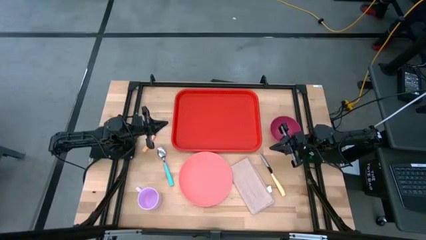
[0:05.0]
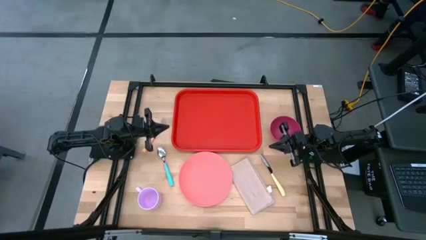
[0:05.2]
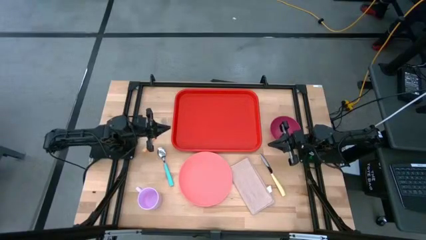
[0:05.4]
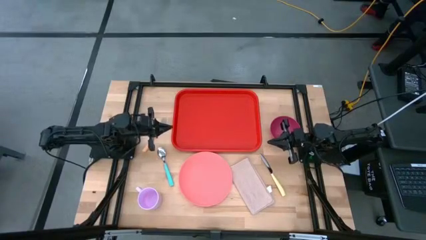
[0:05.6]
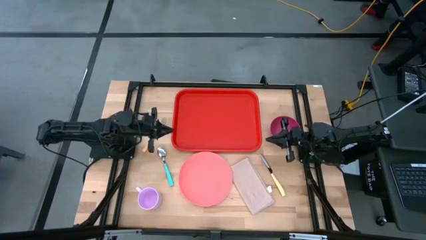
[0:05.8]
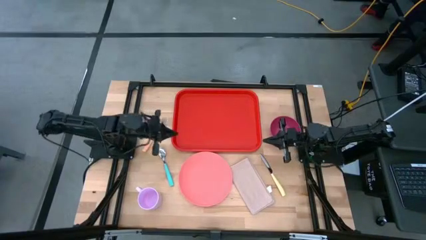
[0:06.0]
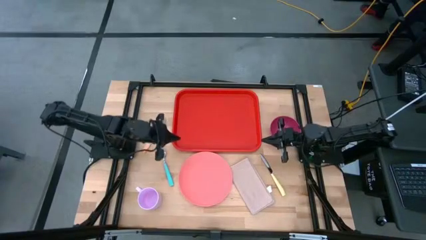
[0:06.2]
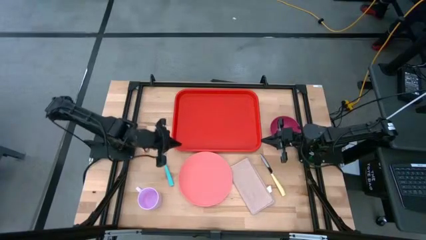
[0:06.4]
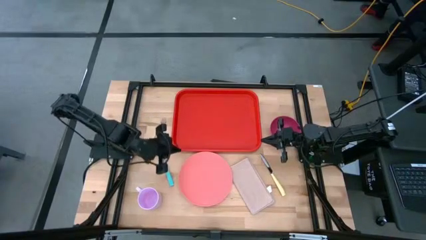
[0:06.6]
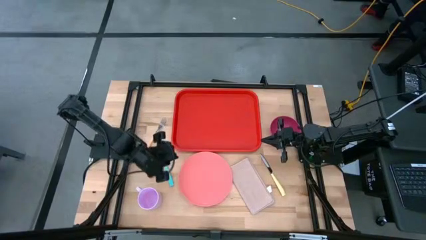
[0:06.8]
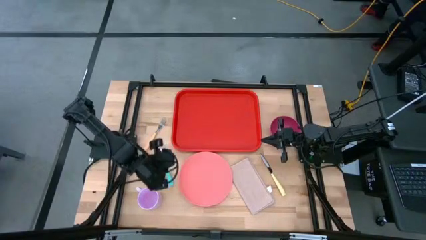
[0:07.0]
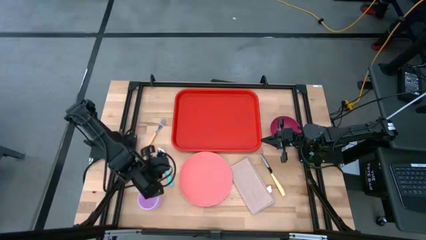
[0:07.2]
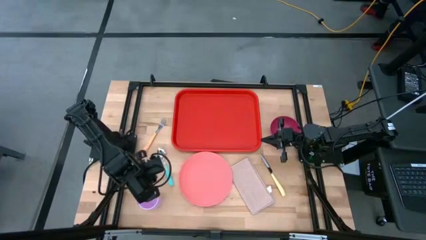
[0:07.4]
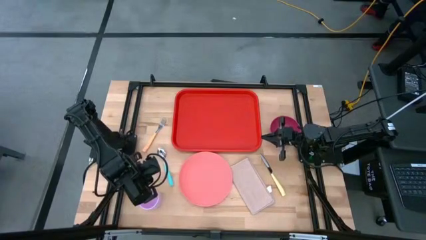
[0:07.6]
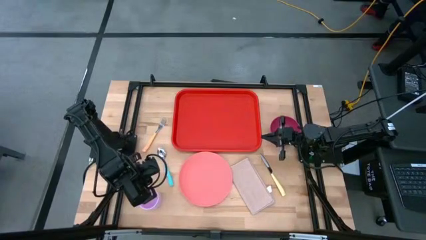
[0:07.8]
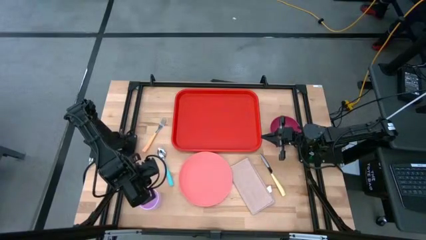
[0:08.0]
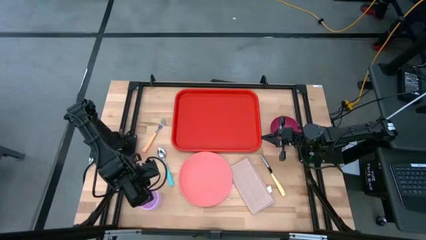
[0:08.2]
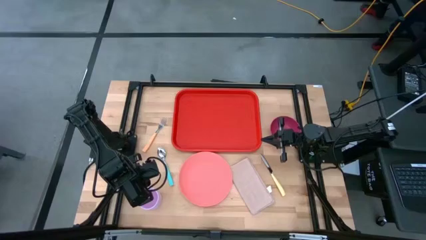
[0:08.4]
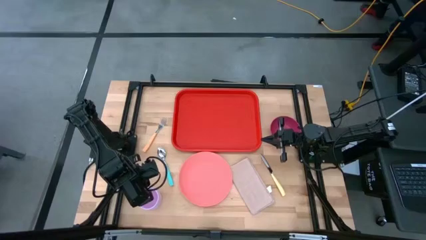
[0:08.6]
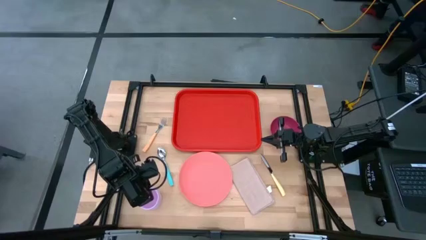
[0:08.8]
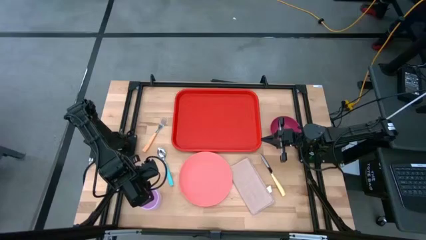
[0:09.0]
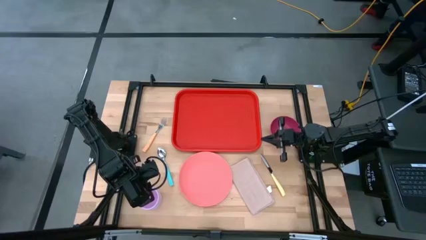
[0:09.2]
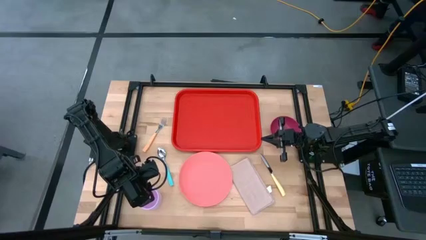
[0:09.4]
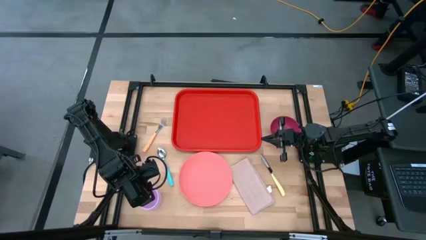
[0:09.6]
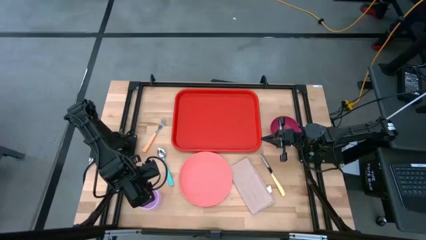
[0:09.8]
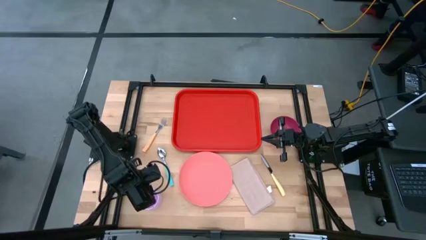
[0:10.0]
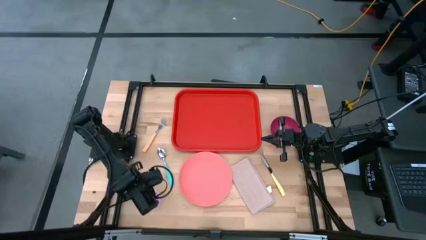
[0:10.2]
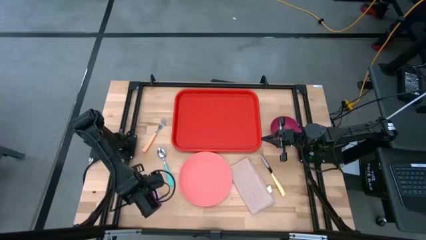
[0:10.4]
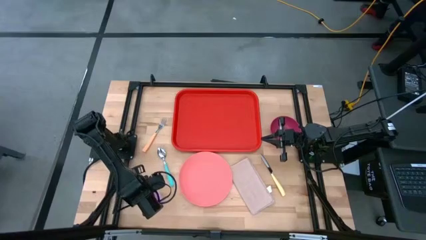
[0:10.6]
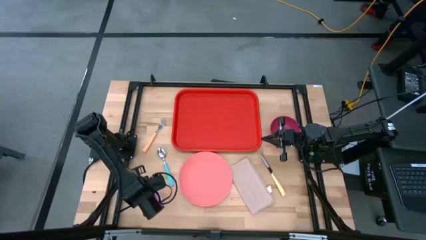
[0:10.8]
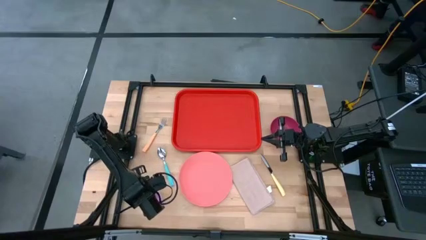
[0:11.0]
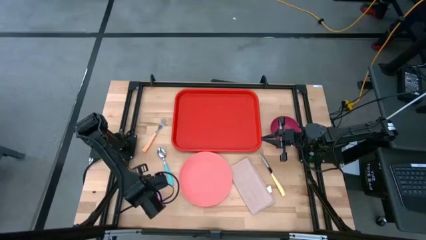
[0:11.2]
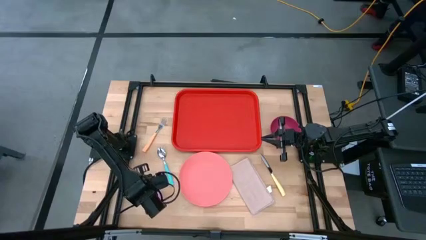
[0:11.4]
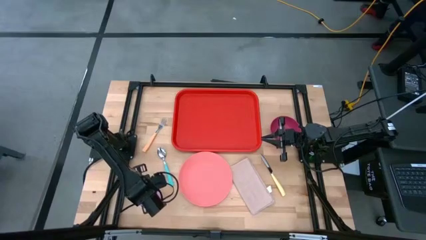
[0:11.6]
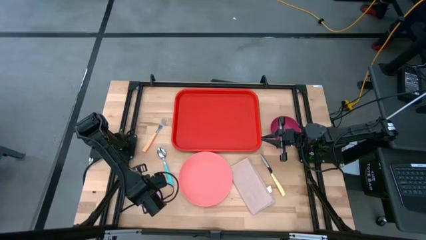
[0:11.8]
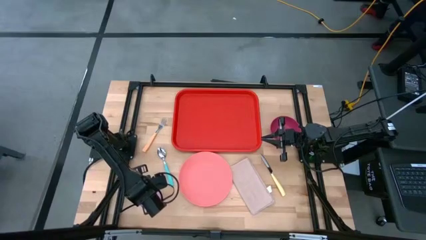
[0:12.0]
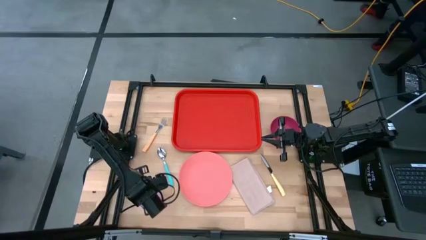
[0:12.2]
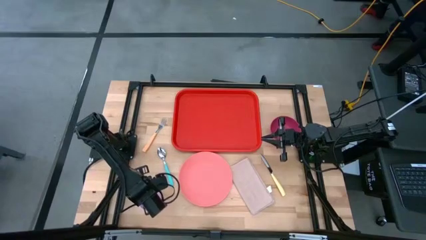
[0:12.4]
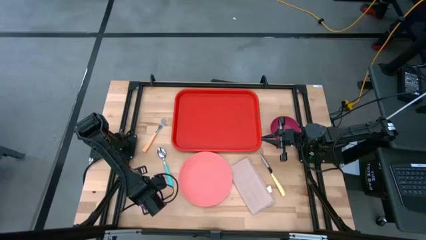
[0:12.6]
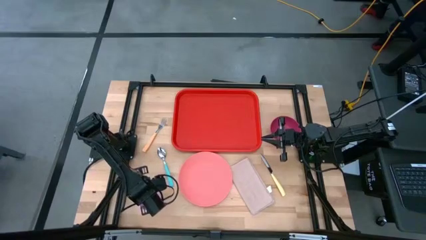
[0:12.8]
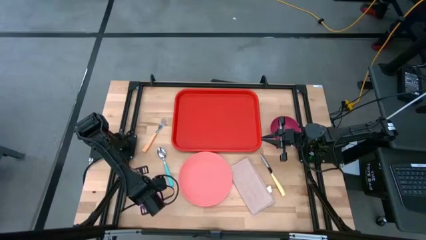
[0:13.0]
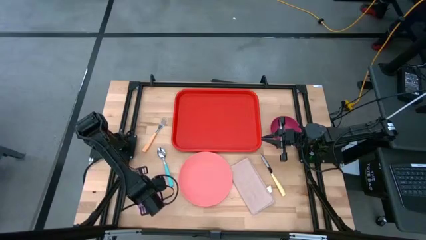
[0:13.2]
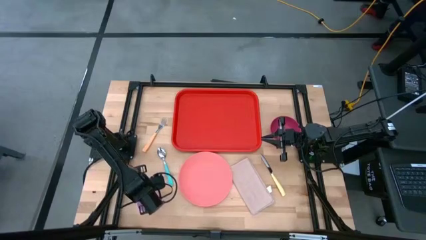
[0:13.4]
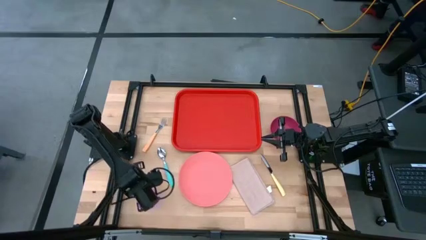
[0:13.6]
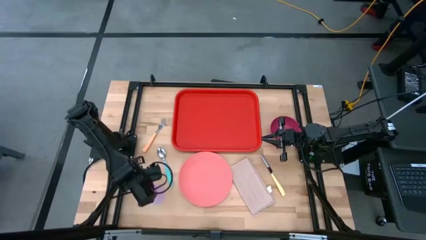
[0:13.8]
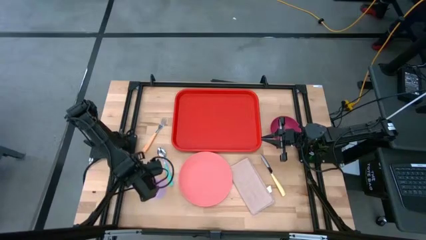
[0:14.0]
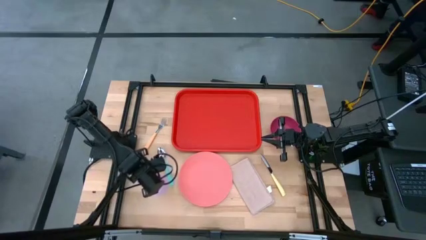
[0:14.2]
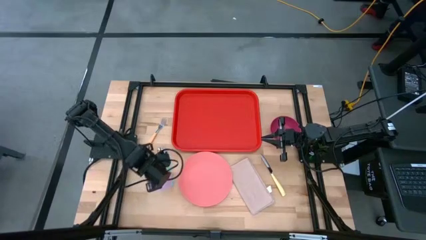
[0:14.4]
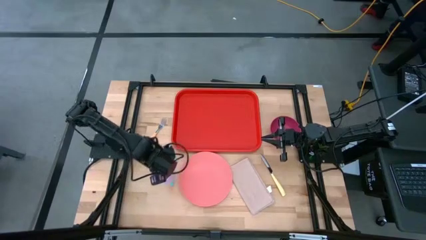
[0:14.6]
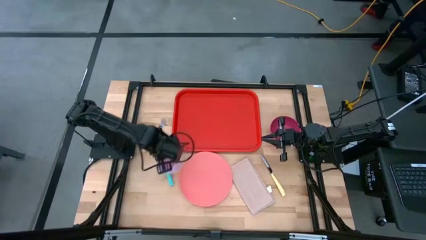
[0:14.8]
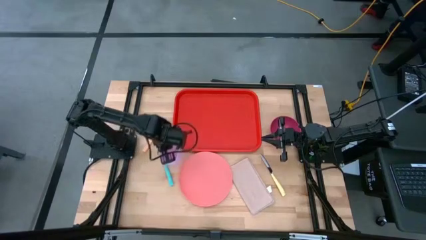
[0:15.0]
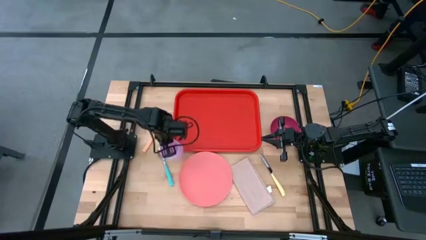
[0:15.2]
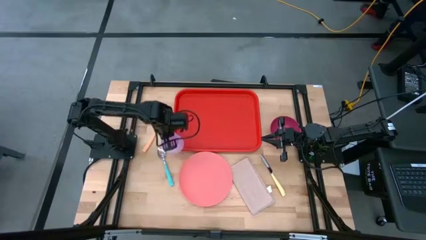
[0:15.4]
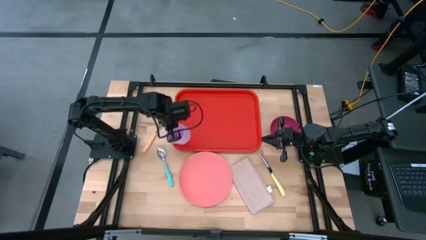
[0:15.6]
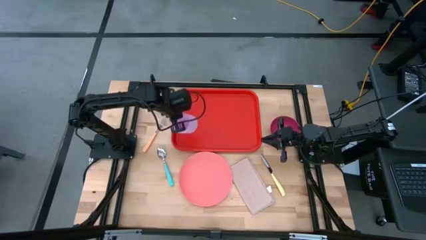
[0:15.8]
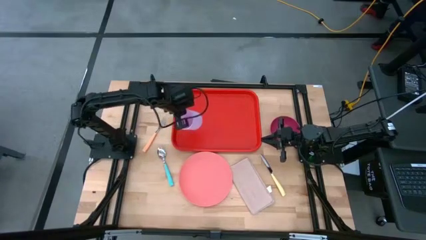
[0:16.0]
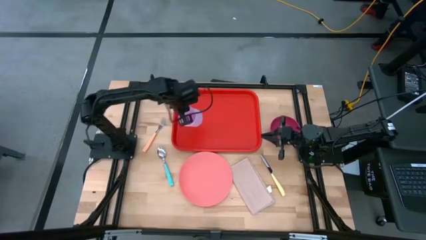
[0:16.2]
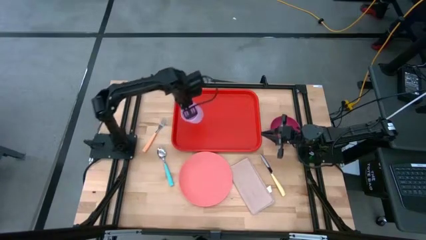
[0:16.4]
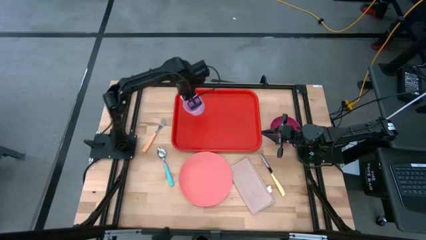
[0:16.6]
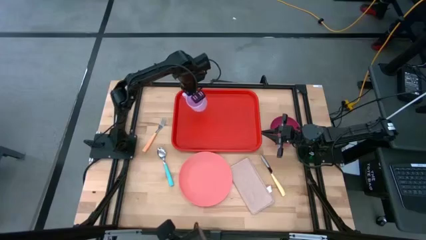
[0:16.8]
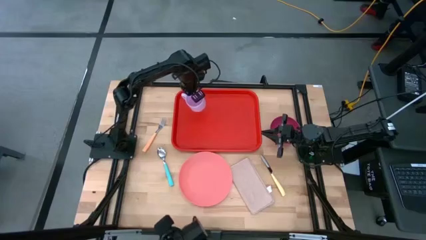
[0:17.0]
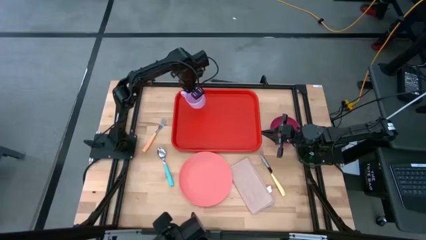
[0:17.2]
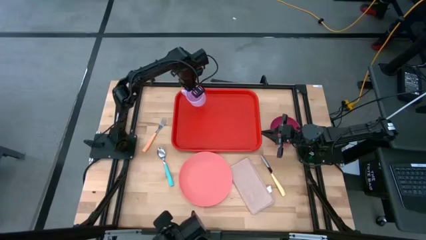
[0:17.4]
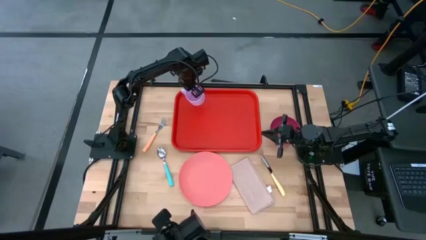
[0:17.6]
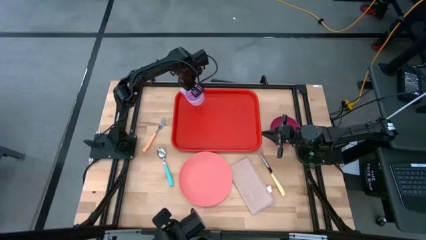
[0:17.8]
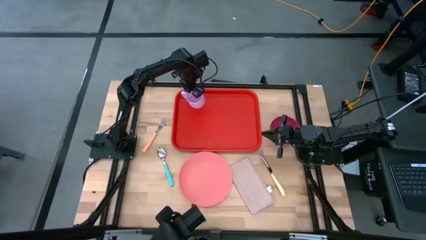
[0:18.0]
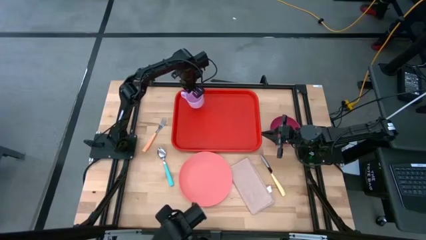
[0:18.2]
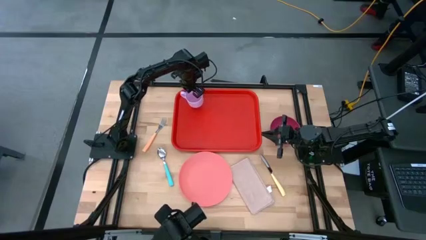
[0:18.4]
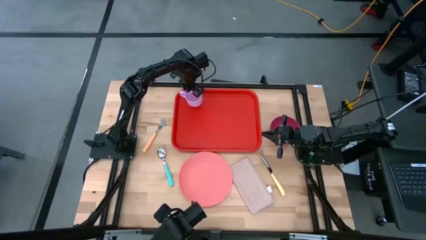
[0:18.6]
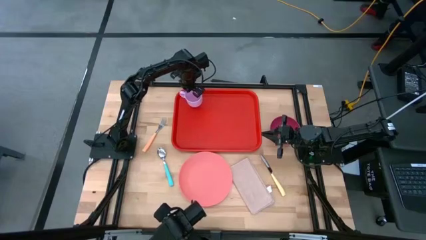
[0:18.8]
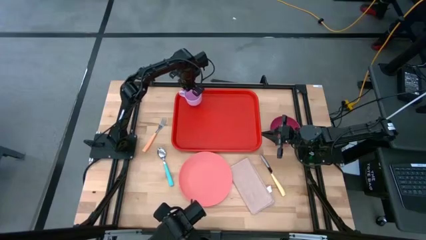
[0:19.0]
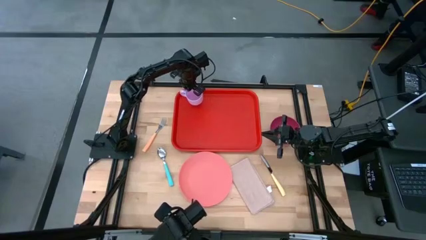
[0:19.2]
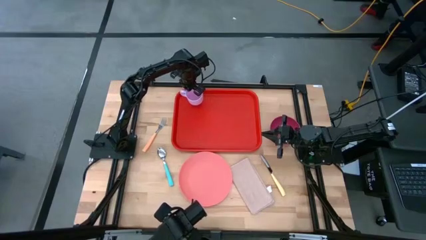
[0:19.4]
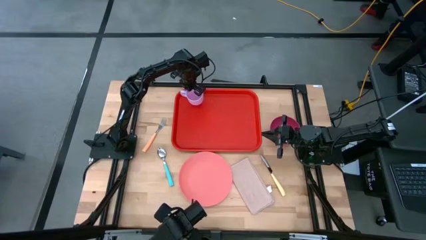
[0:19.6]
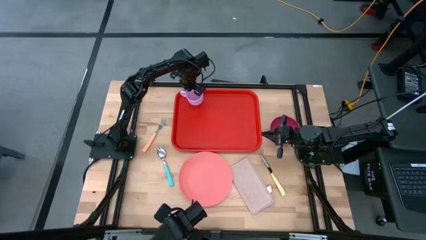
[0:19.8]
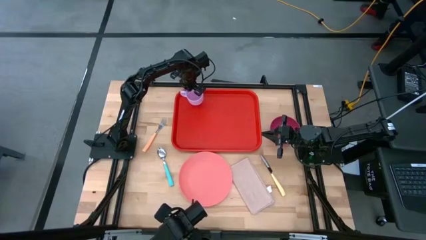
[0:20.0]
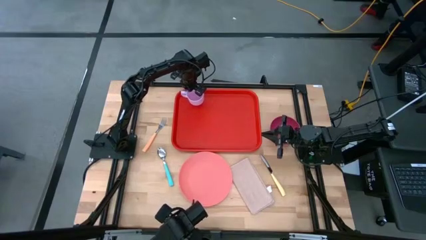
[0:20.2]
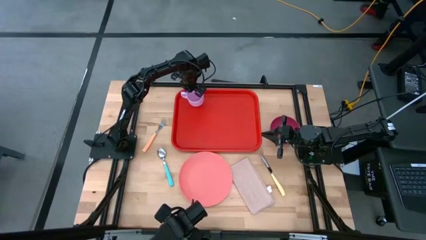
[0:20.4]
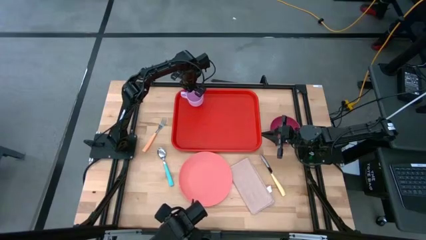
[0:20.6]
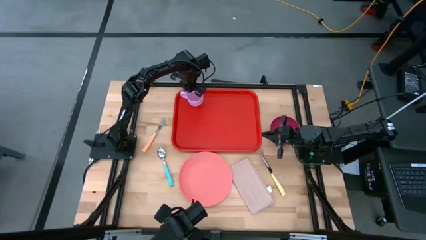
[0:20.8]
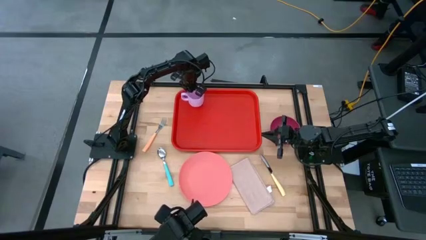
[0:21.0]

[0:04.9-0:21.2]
Task: Set up tray
Put the violet mug on the red tray
